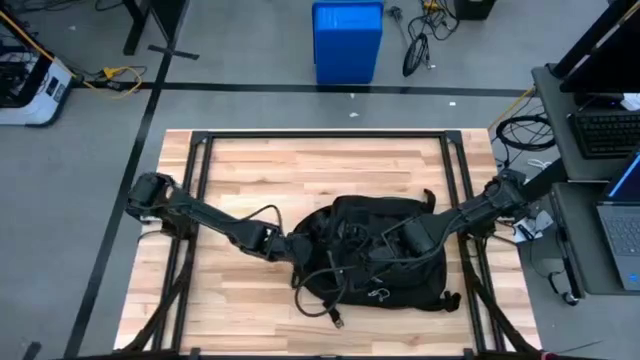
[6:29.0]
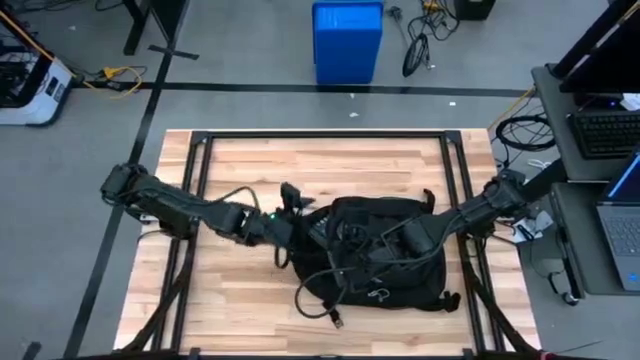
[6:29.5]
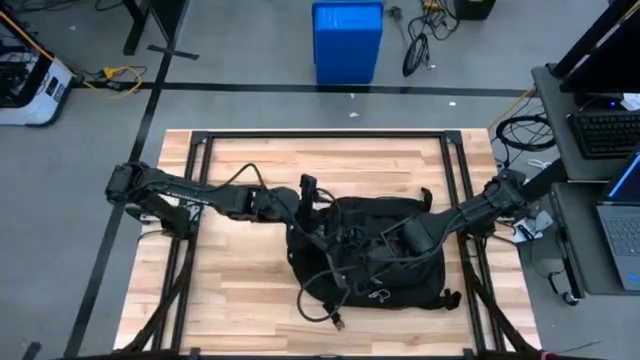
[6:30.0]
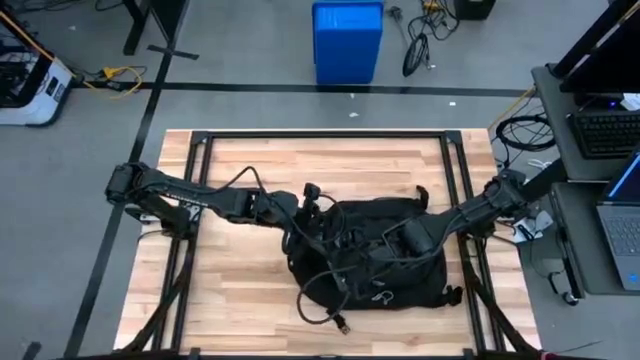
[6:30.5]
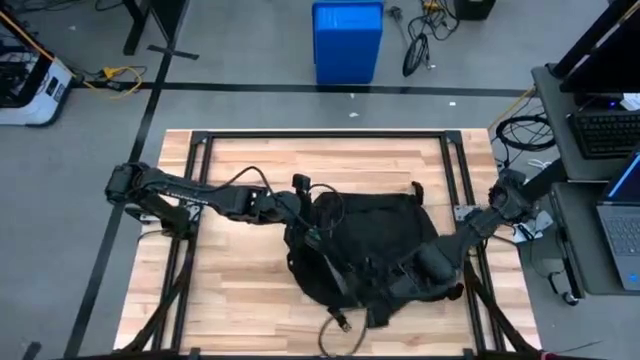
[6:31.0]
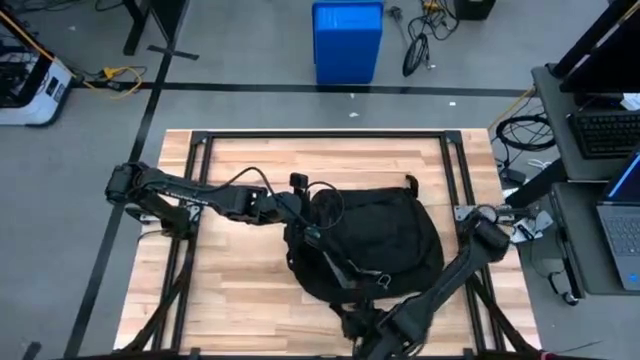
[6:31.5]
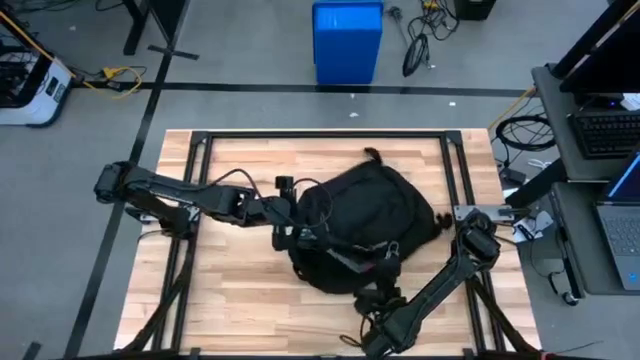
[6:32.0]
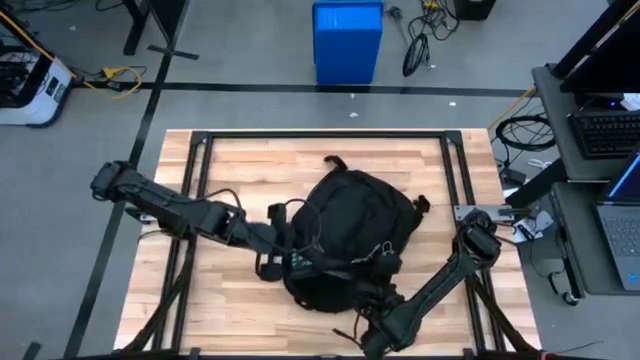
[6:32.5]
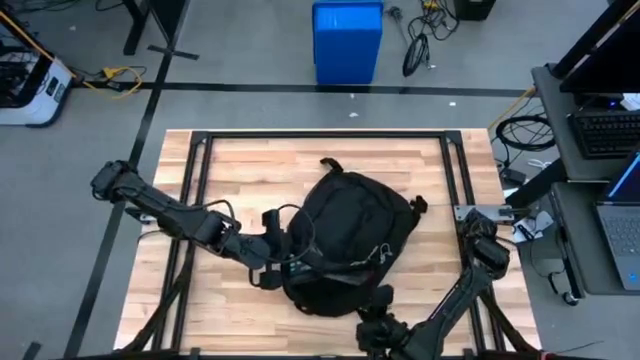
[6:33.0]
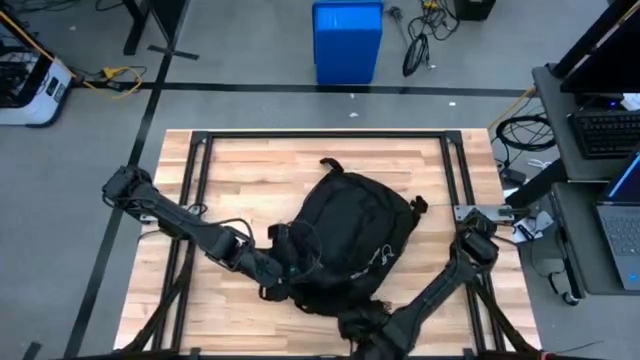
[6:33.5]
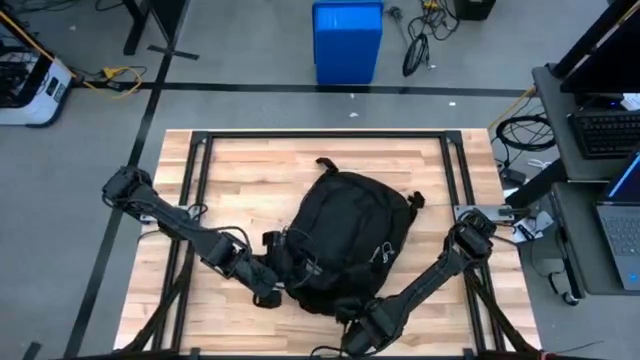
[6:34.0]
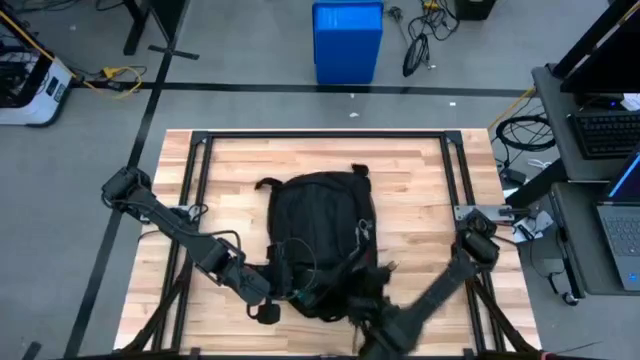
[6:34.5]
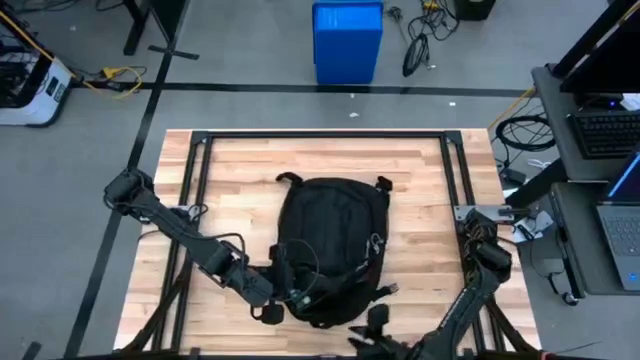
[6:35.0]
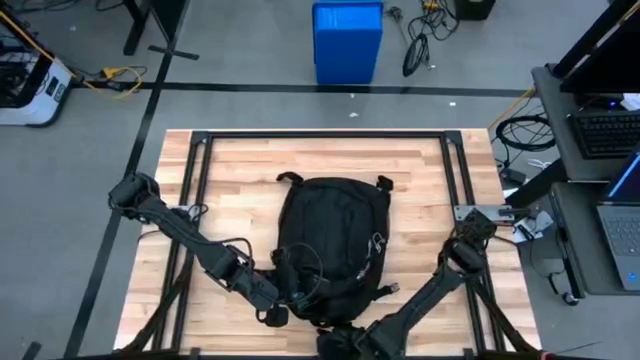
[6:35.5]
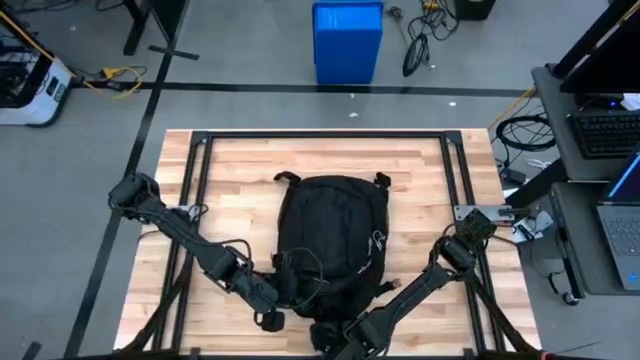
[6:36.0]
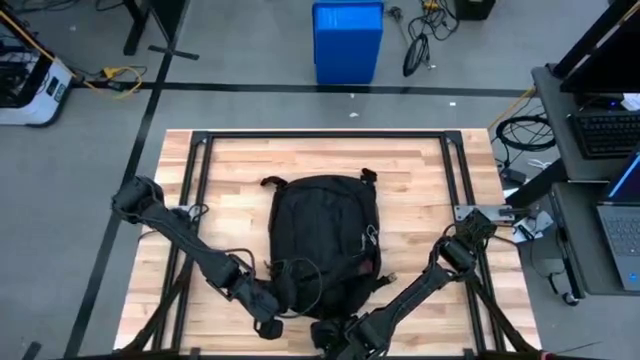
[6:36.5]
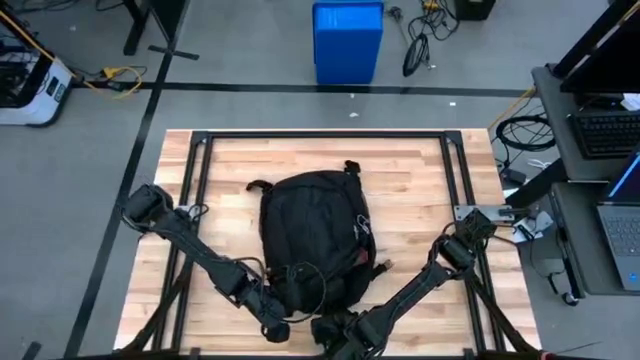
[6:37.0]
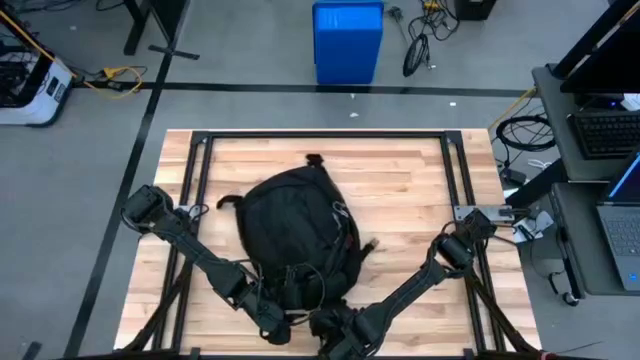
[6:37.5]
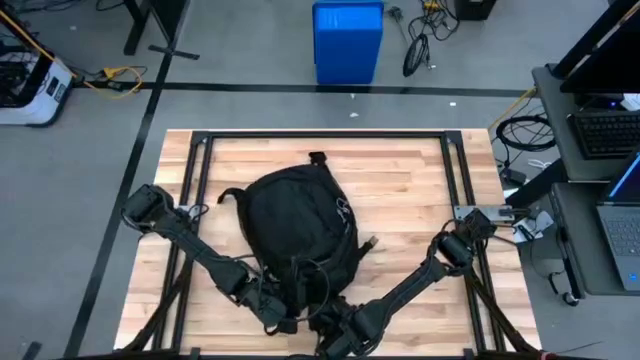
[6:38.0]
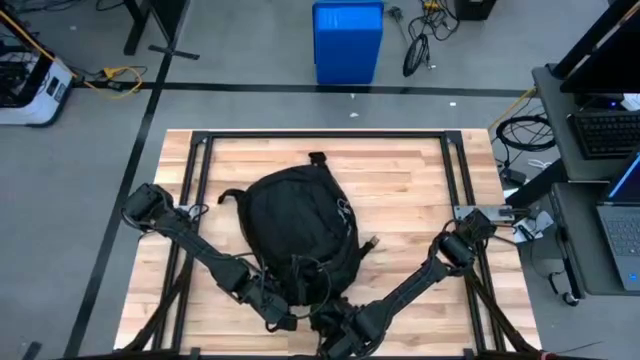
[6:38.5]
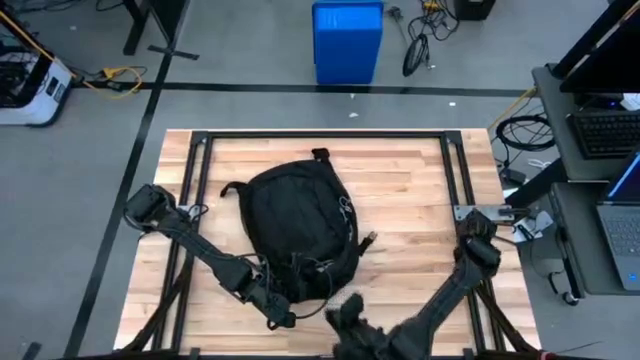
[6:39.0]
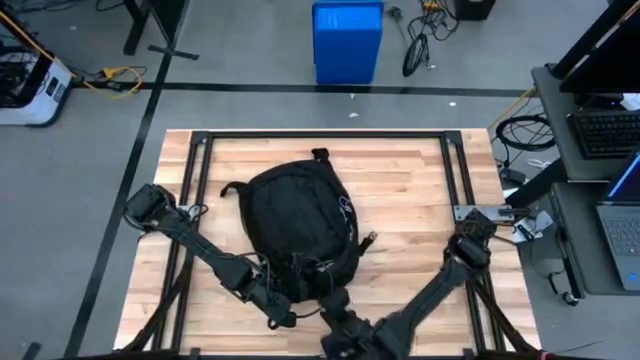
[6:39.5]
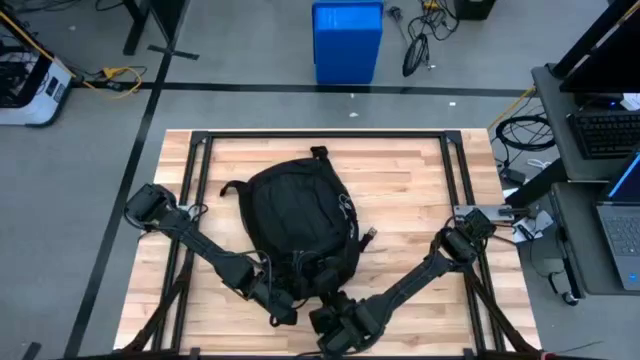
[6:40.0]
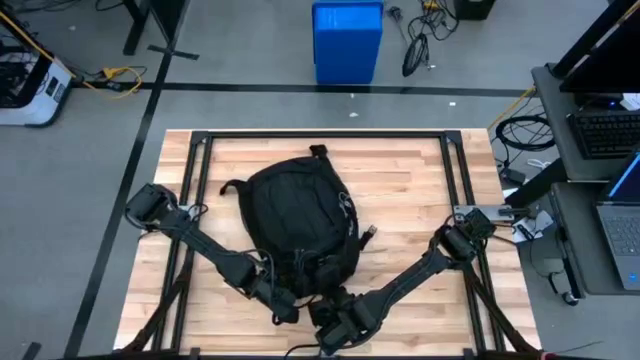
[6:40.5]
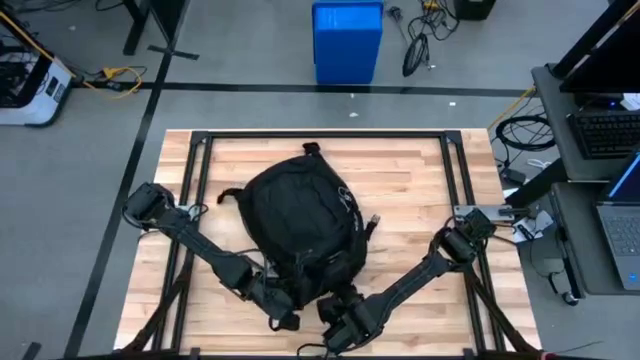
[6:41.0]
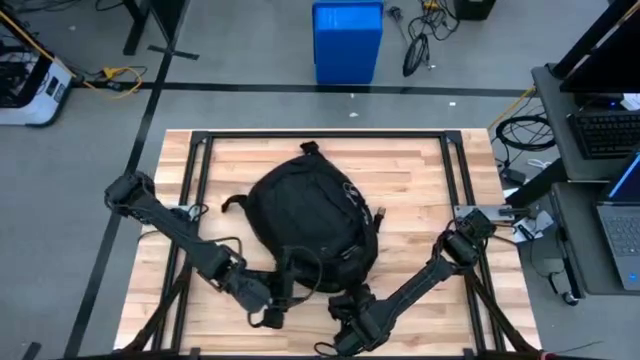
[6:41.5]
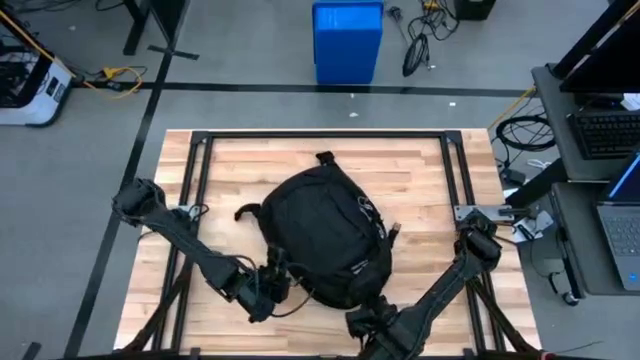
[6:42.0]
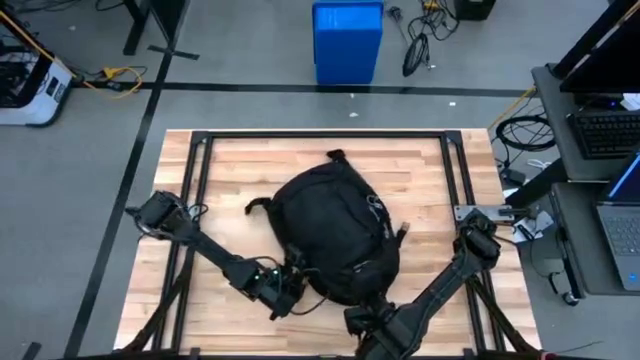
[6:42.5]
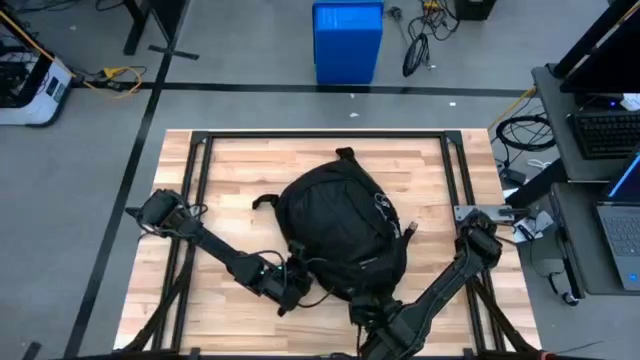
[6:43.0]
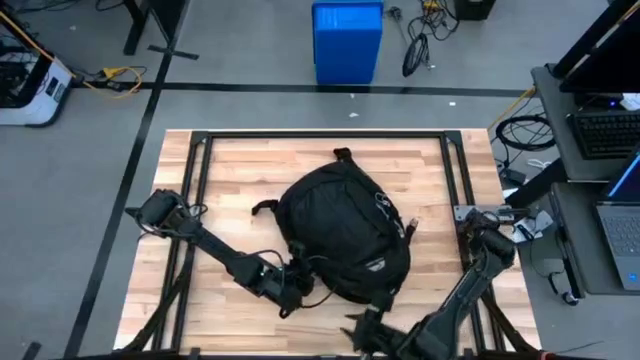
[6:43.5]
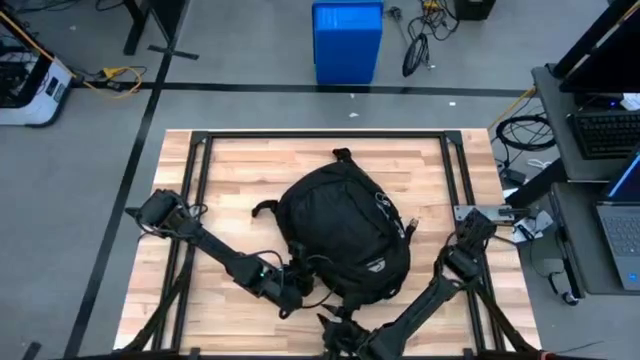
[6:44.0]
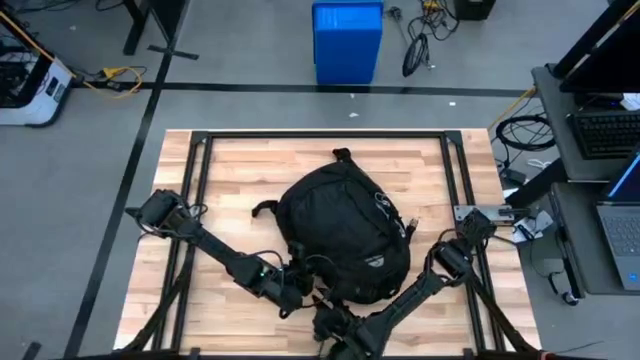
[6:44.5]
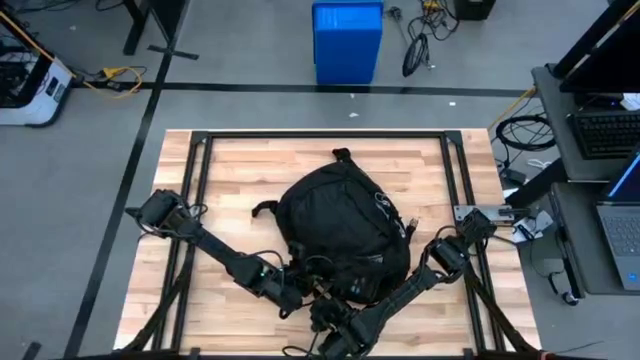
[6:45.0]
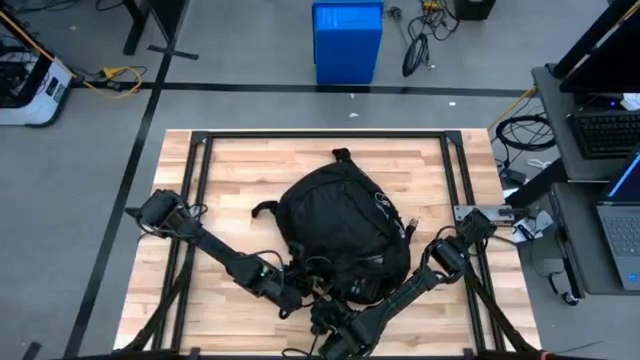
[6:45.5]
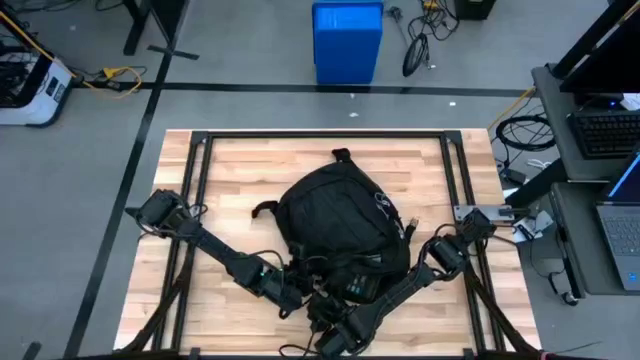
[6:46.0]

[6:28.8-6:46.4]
Task: Unpack backpack
Close the black backpack

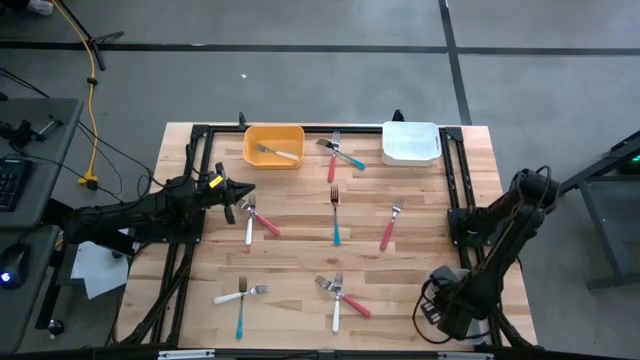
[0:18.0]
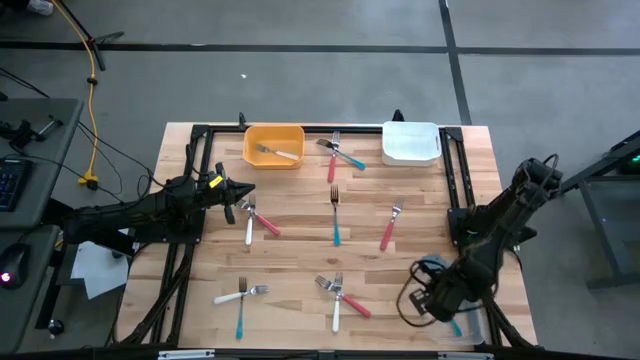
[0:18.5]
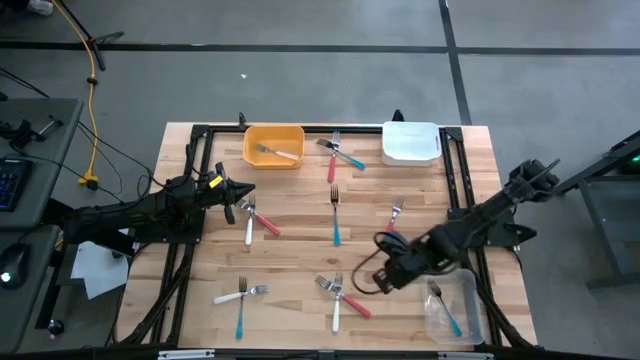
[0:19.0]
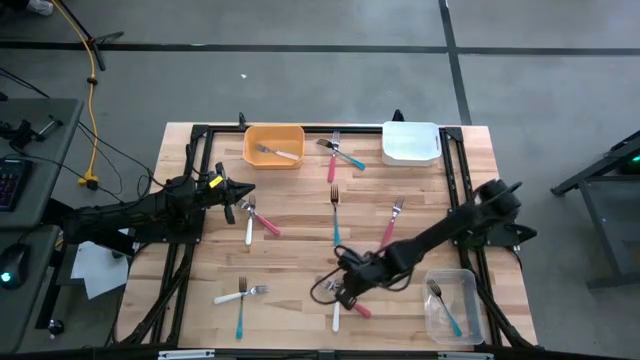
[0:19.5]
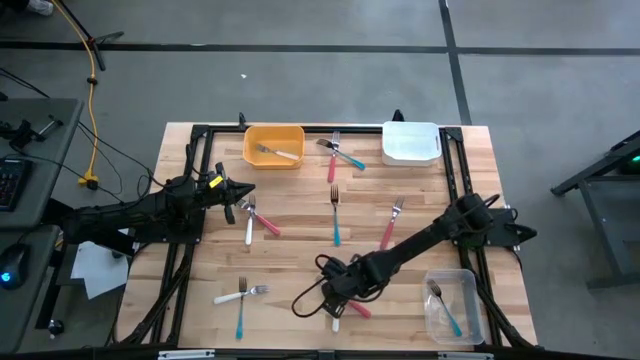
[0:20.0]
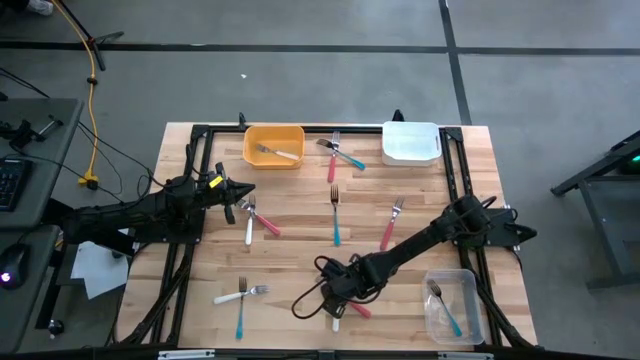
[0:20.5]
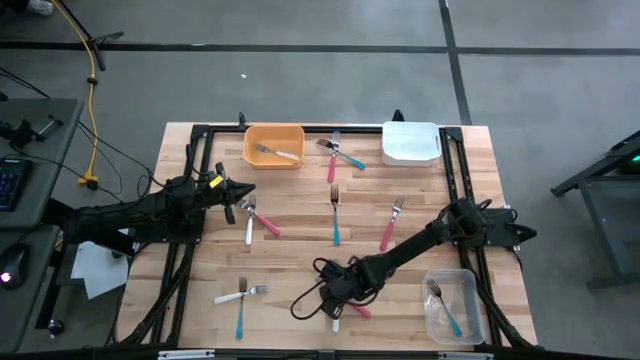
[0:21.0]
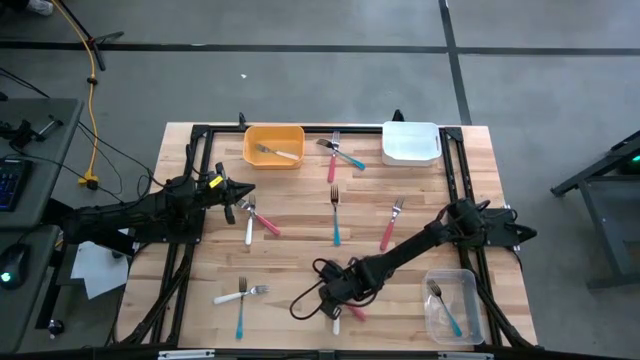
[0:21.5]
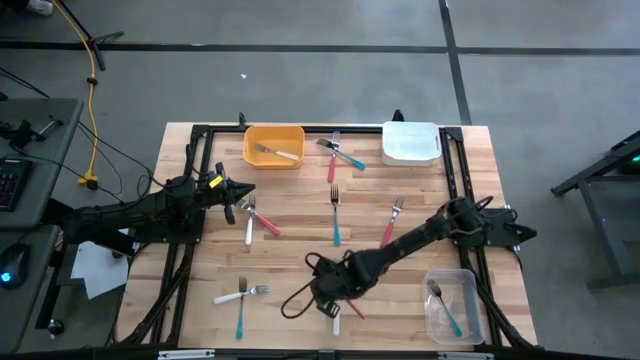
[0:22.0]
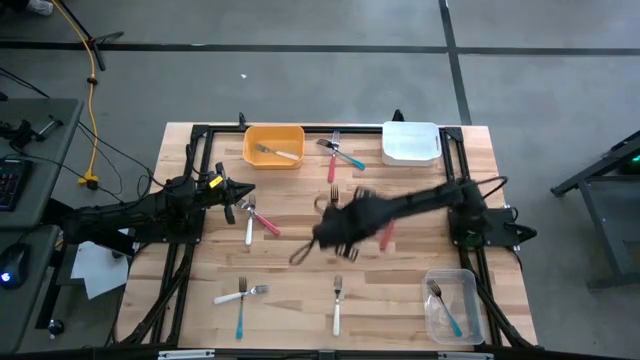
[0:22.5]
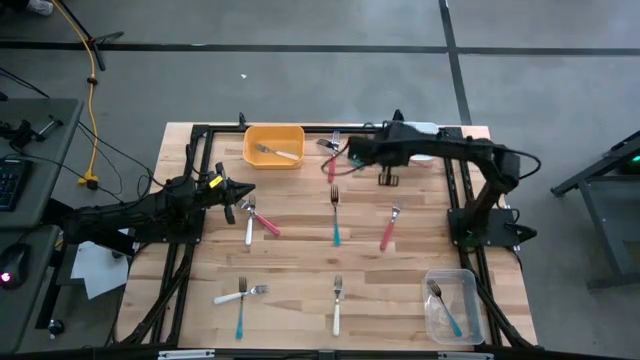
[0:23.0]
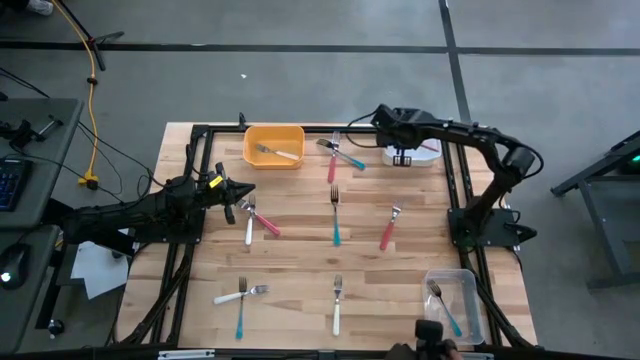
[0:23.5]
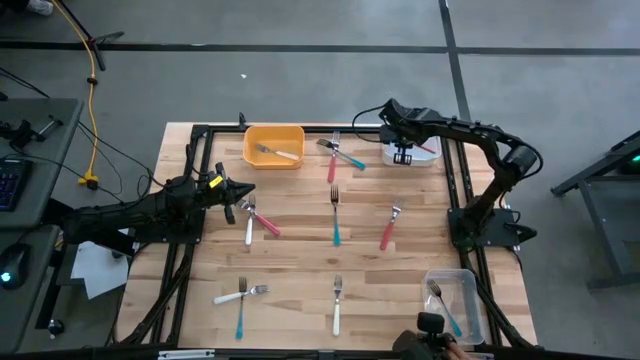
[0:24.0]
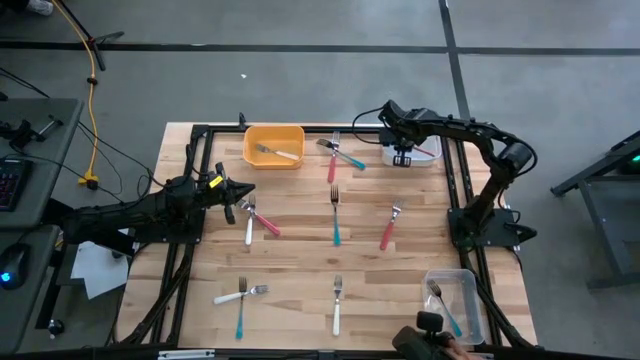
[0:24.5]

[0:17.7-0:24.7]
Task: Sort silverware by color (type)
Put the bottom pink fork into the white bin
